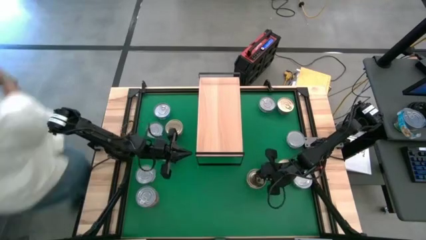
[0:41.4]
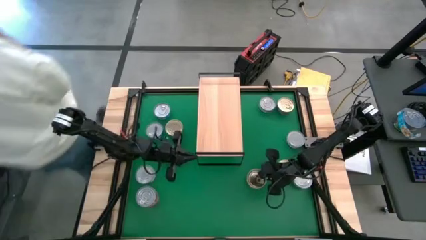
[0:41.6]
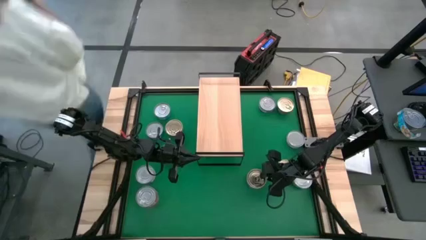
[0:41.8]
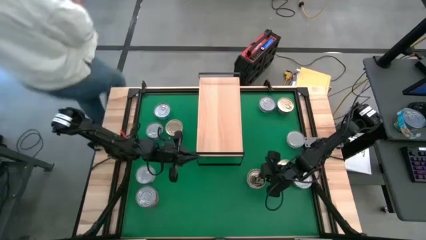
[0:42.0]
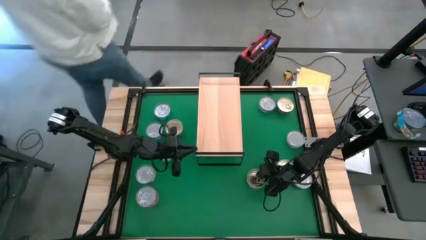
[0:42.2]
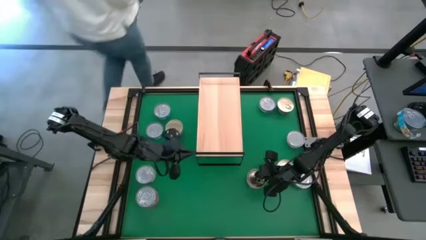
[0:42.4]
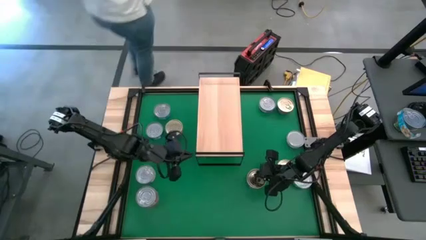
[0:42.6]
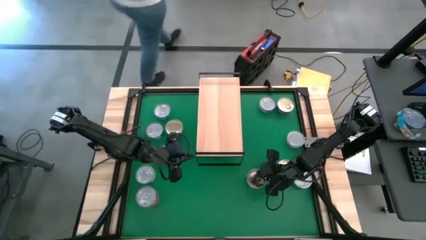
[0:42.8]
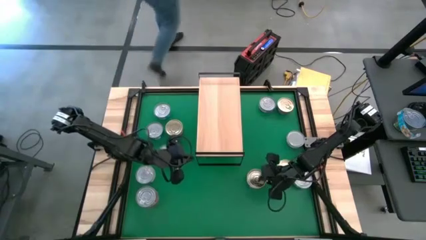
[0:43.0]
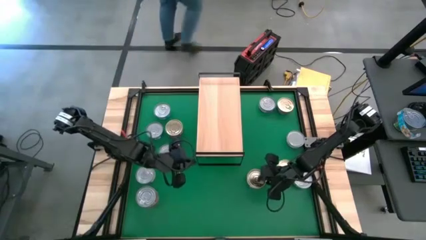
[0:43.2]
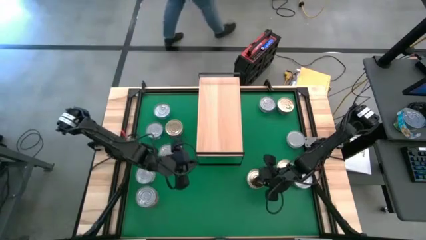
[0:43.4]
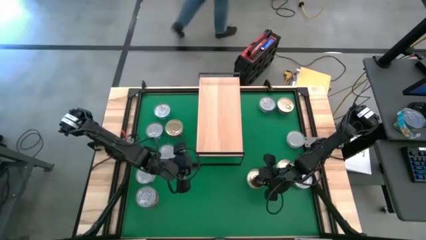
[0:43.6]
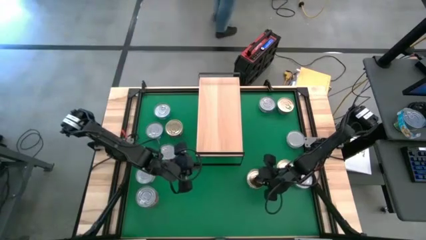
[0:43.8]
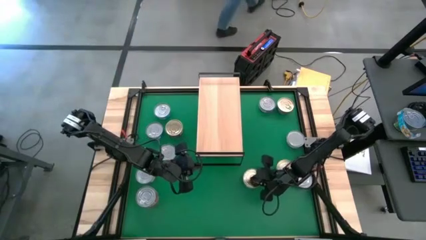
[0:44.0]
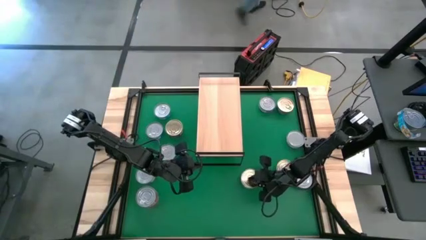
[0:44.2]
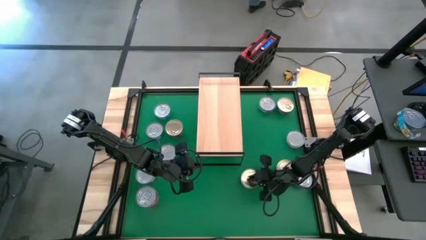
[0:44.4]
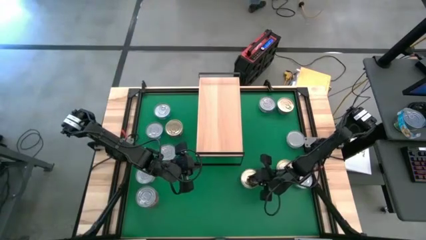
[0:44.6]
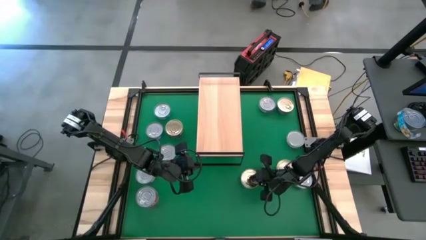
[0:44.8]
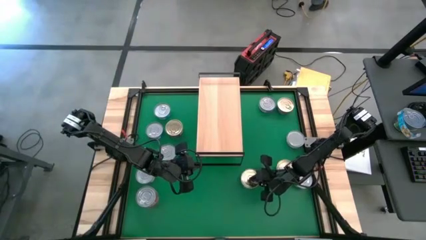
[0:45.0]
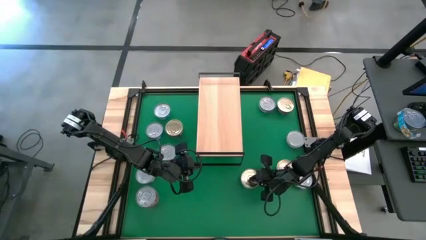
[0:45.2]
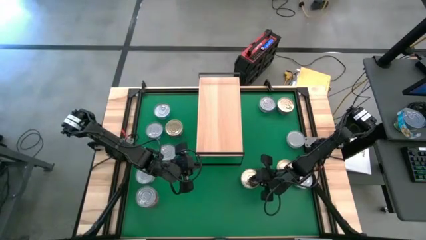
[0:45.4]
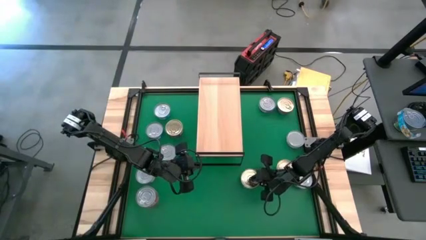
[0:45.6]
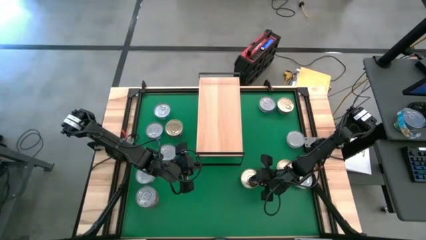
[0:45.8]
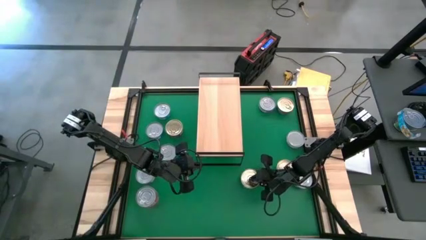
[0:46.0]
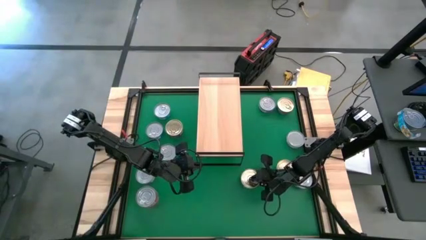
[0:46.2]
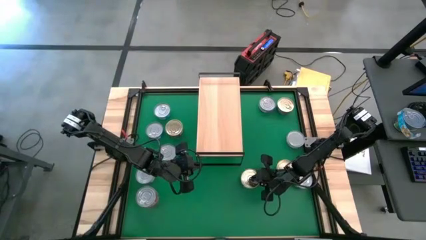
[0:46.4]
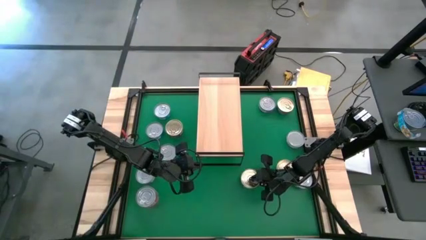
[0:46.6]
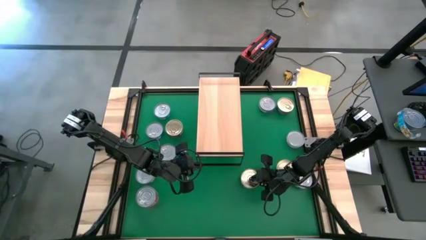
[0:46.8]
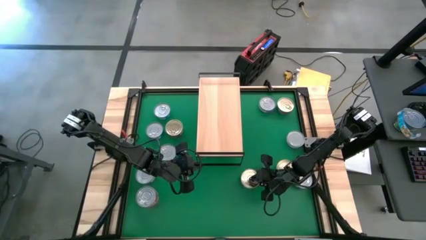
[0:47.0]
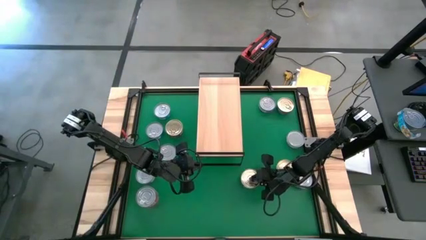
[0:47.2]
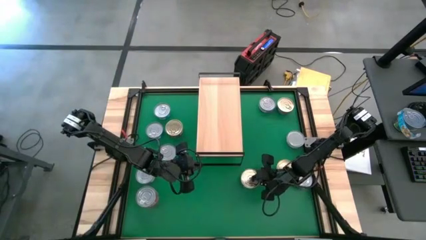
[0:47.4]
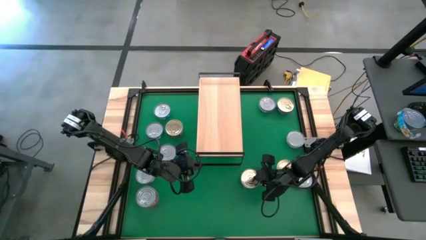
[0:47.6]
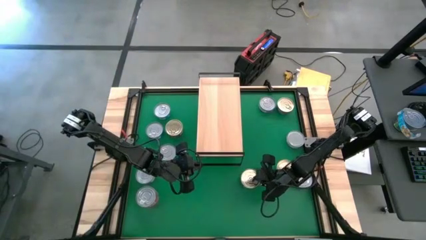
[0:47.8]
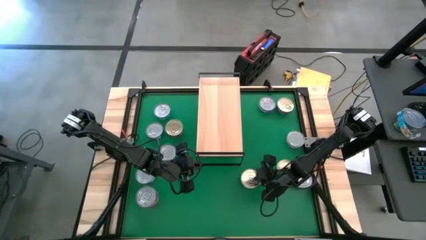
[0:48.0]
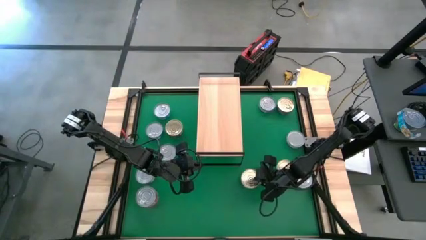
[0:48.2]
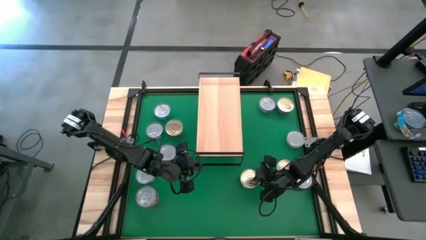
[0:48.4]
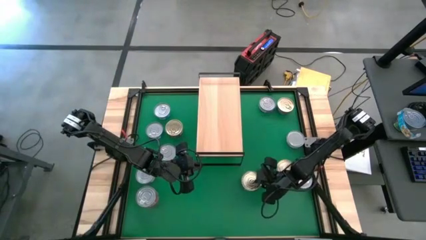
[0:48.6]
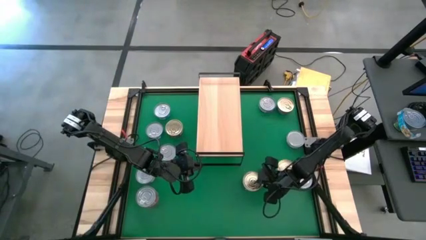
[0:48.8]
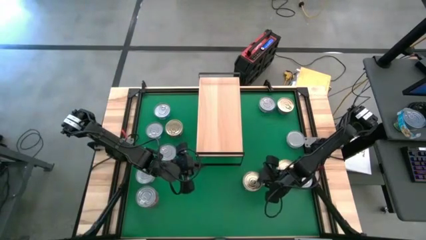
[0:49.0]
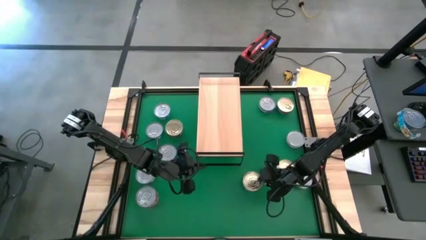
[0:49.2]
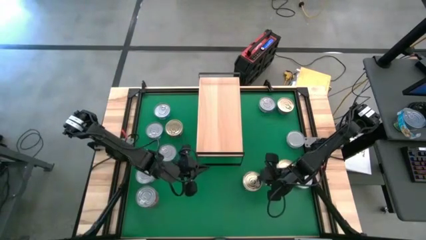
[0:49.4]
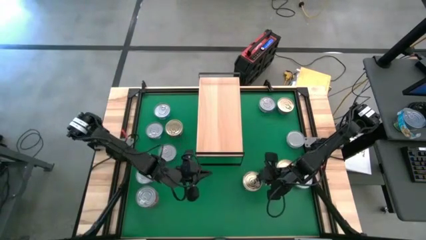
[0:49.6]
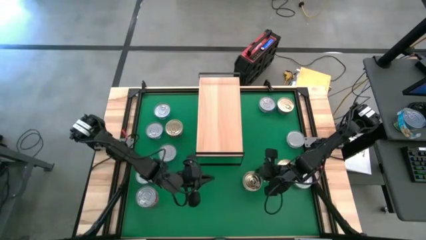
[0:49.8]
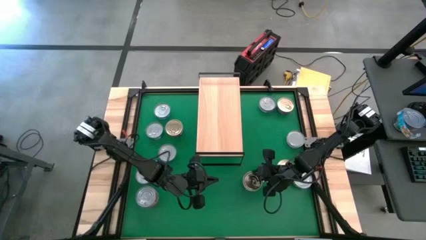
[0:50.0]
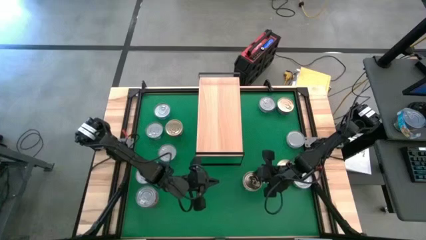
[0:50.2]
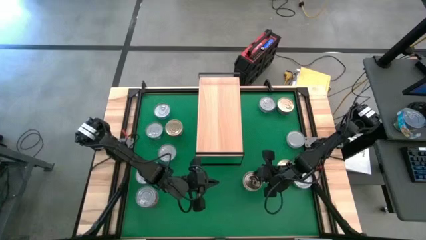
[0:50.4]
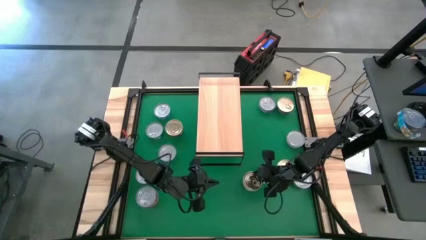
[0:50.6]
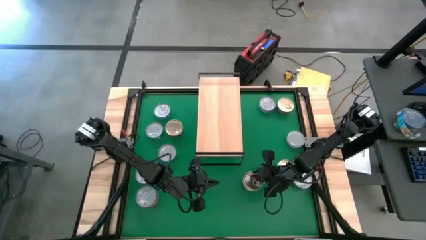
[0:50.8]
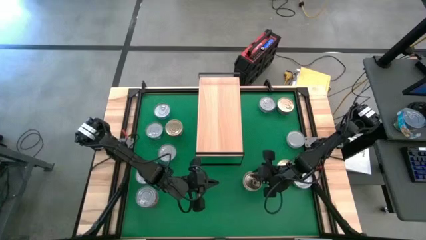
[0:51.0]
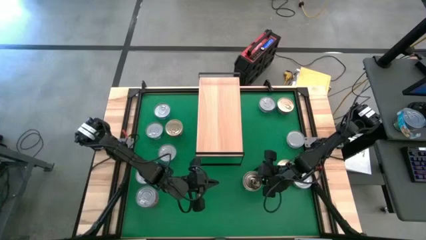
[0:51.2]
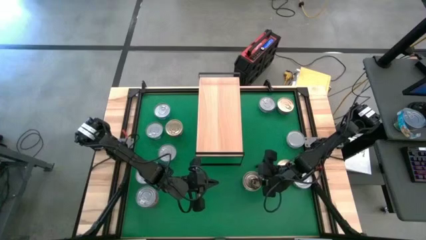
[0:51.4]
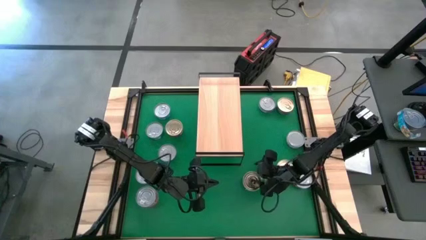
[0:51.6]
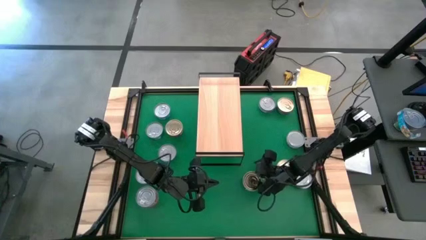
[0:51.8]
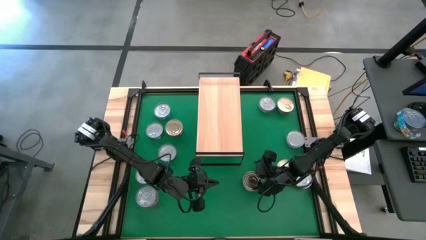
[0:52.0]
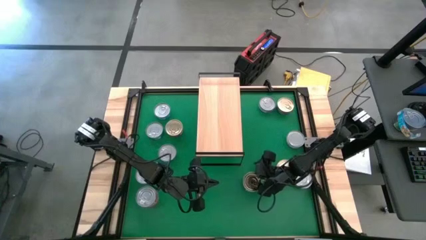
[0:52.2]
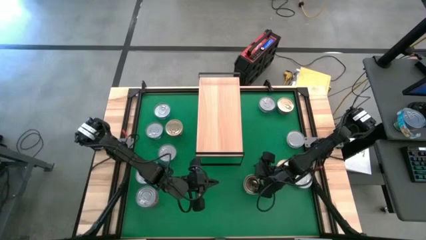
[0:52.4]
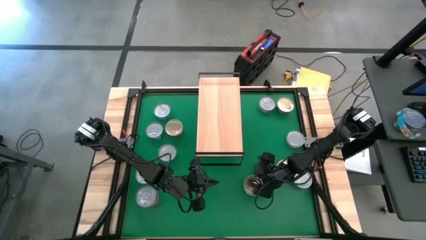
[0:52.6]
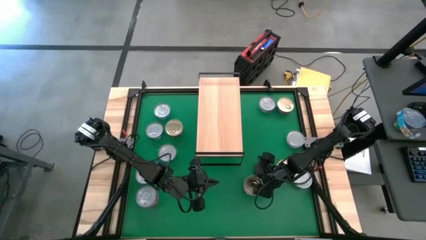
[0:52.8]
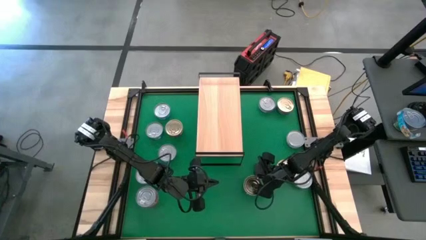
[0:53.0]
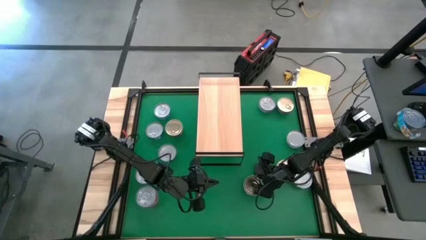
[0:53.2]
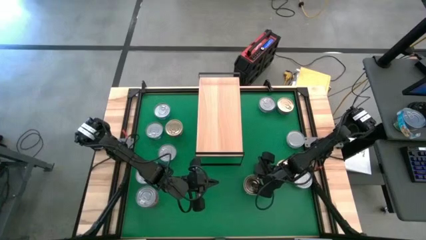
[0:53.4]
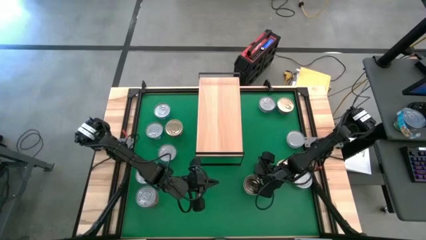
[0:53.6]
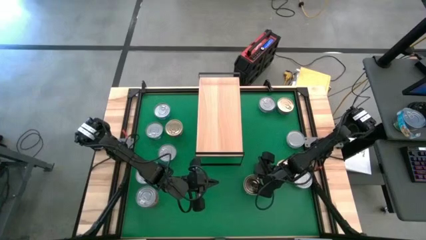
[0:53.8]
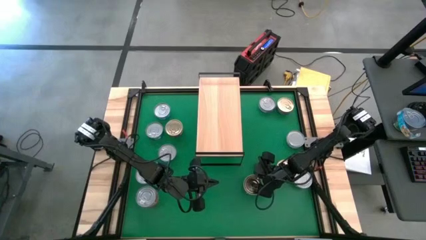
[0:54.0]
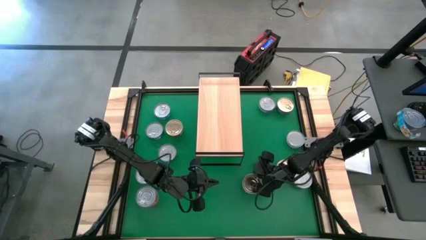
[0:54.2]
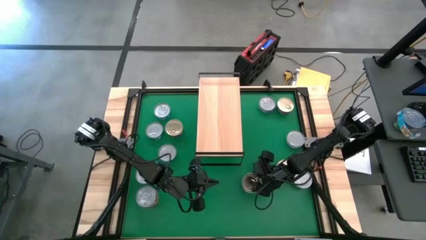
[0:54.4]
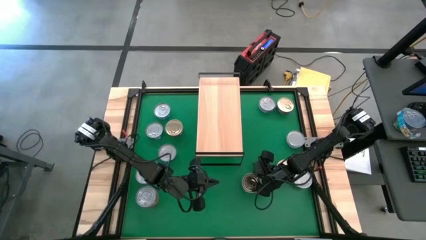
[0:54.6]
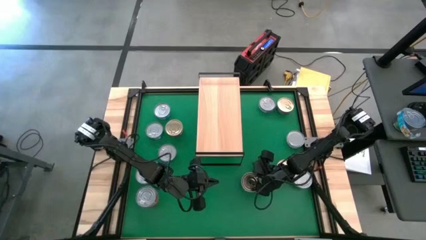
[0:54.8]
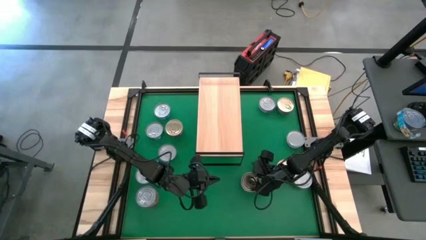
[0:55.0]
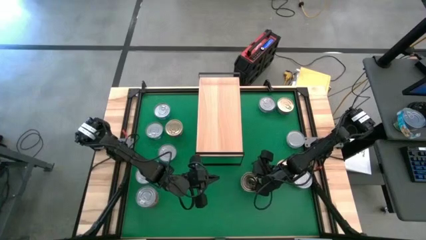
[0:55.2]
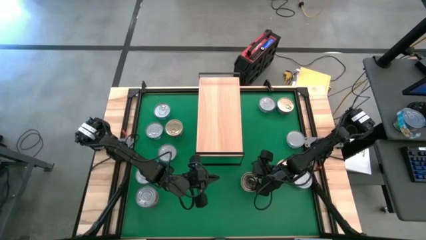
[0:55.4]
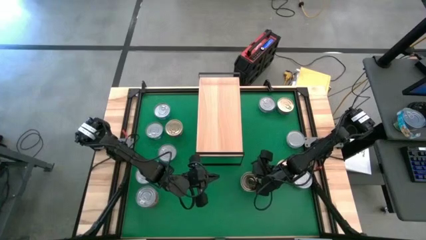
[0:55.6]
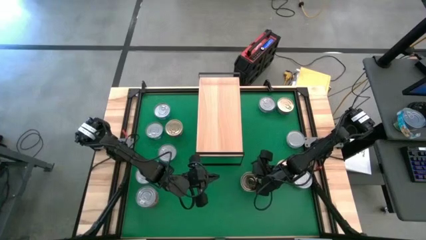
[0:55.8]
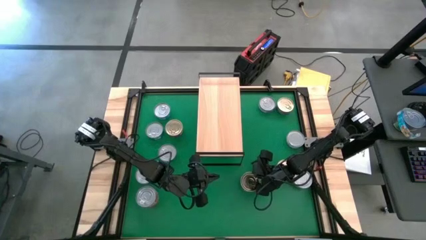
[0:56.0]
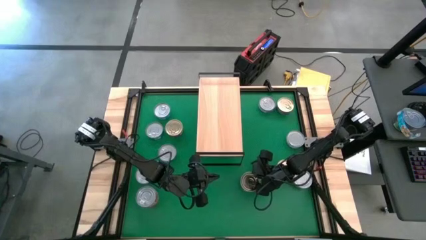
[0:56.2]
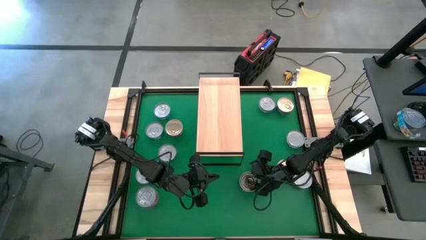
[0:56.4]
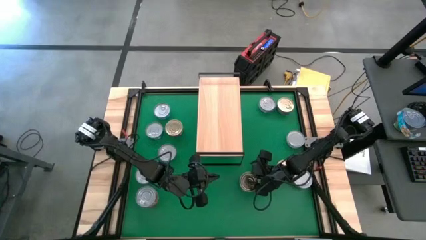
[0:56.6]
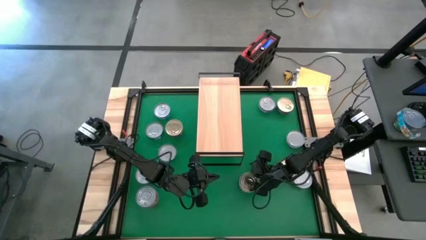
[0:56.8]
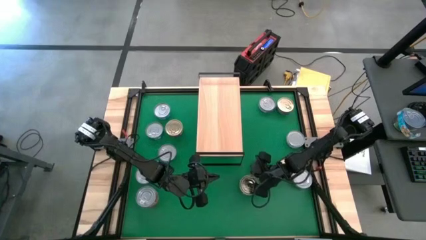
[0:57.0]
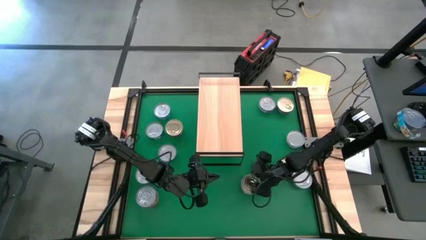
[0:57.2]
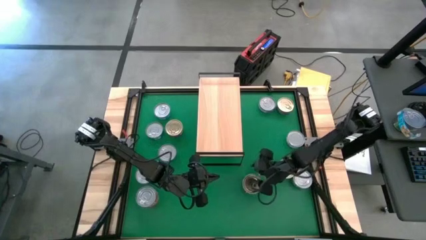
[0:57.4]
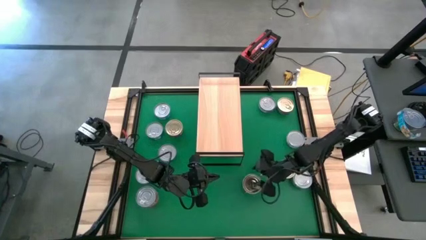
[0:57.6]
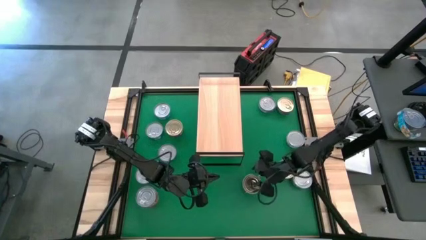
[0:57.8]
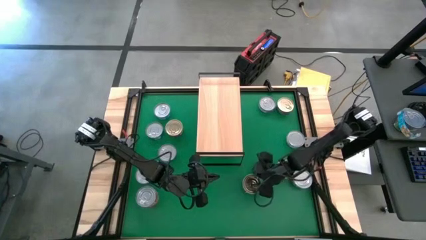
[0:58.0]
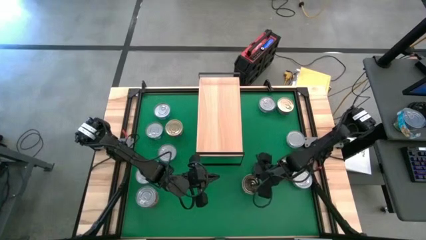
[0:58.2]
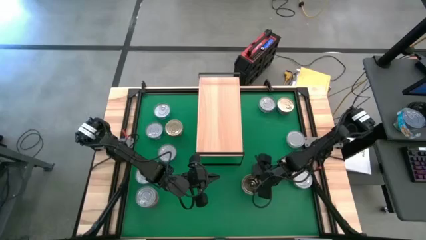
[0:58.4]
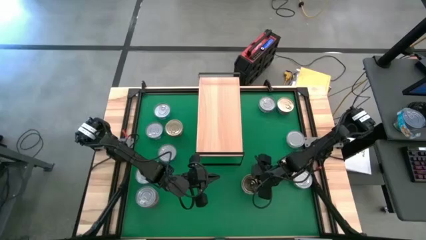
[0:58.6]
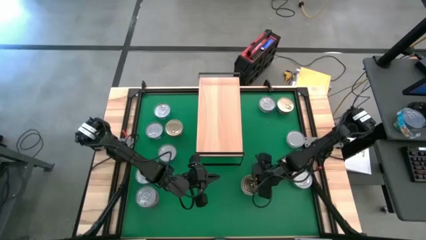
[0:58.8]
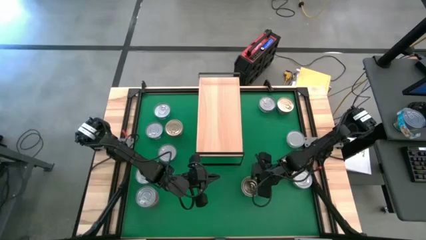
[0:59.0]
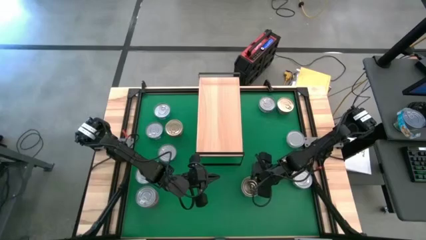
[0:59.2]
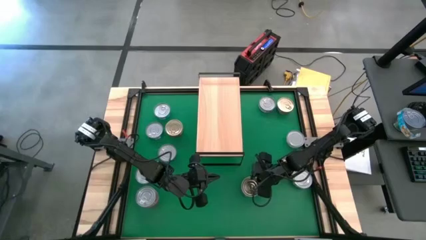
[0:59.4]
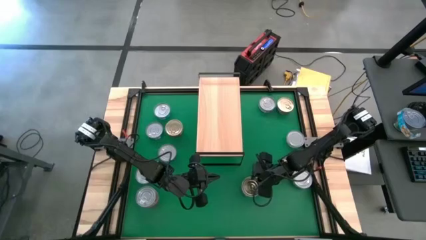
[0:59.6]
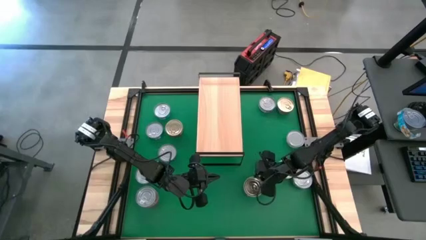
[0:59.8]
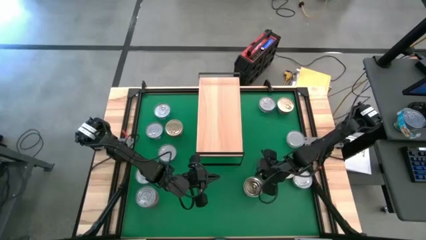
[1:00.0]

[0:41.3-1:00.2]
Task: Stack canned seafood by type on shelf
Put the bottom center dark blue tuna can on the shelf
